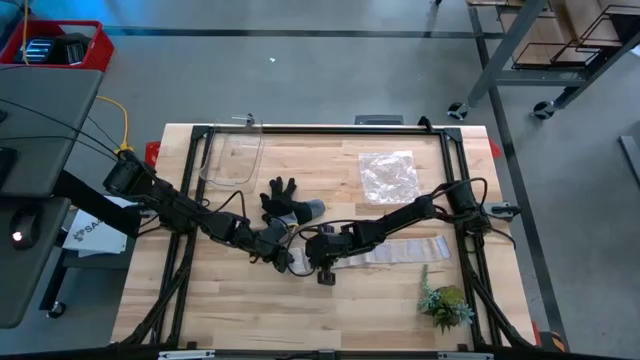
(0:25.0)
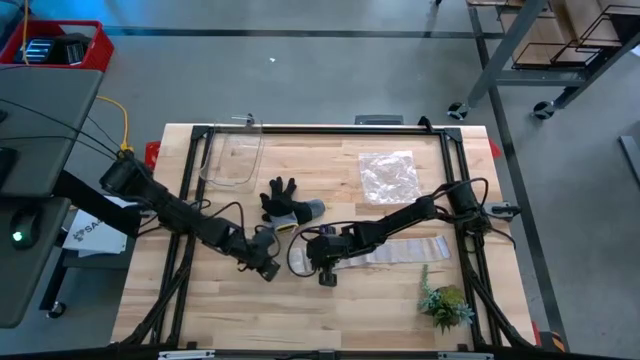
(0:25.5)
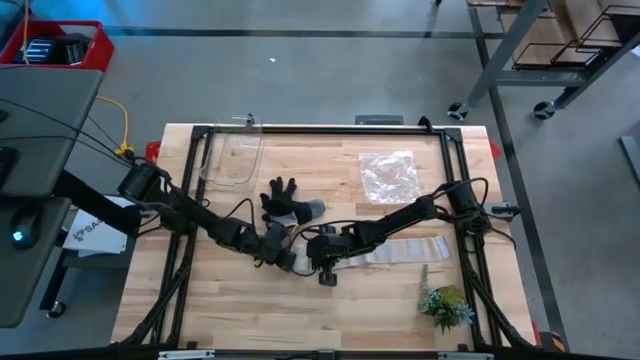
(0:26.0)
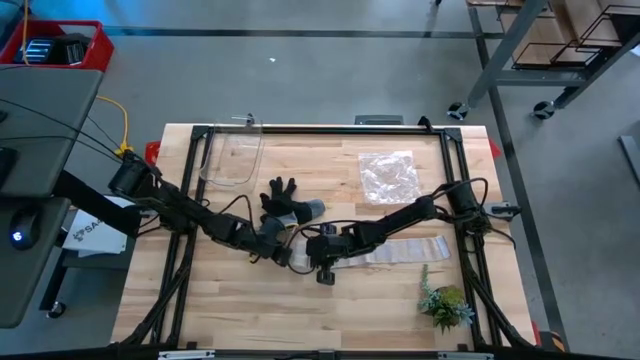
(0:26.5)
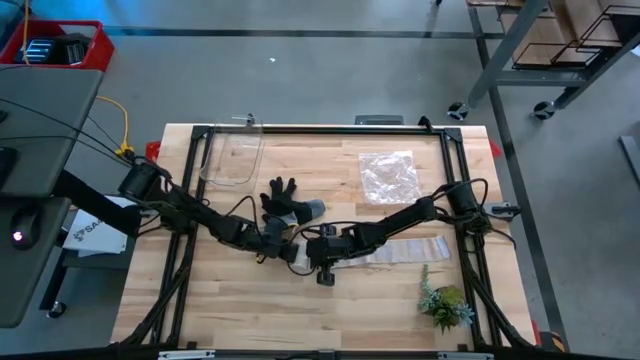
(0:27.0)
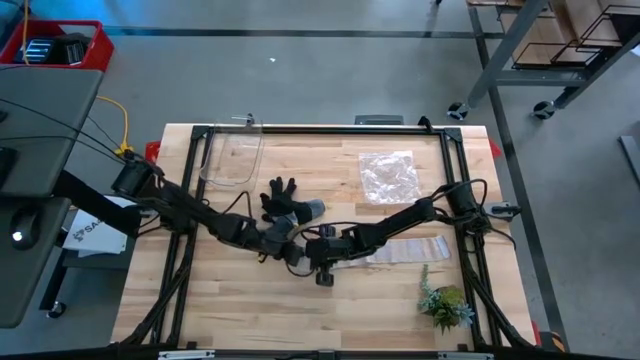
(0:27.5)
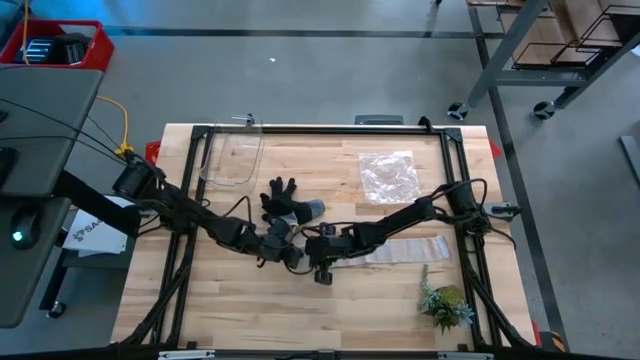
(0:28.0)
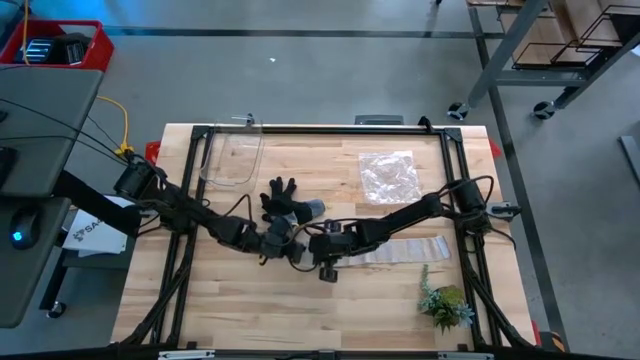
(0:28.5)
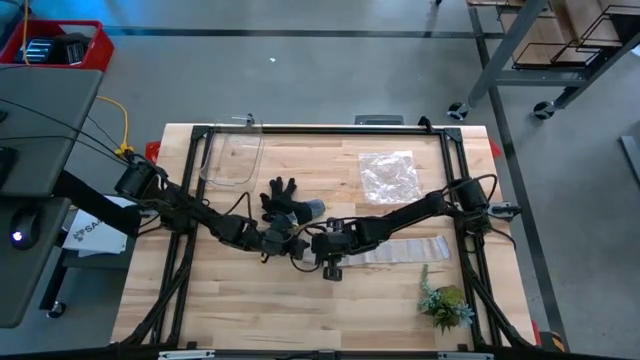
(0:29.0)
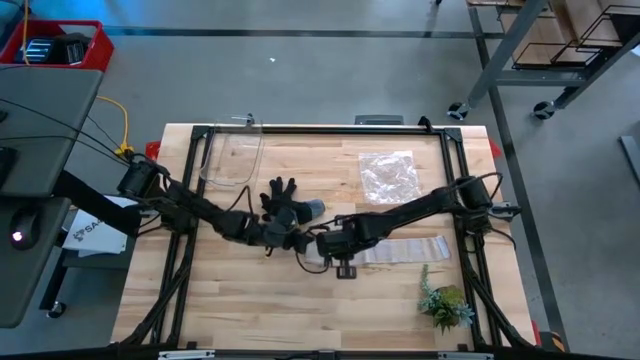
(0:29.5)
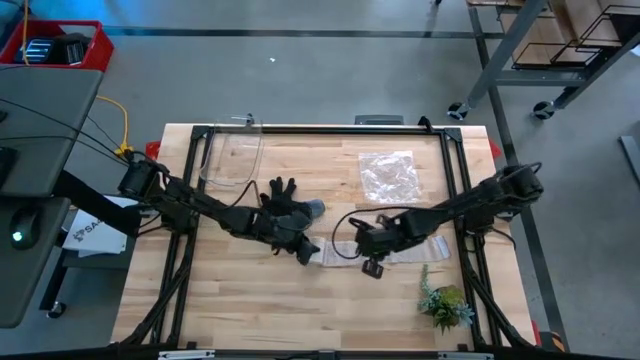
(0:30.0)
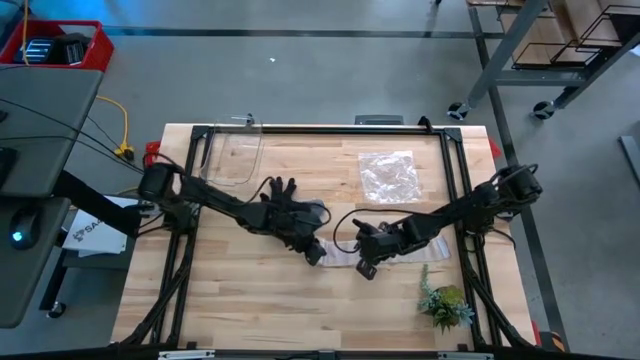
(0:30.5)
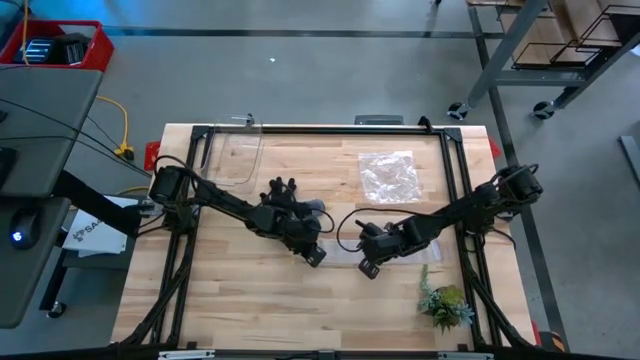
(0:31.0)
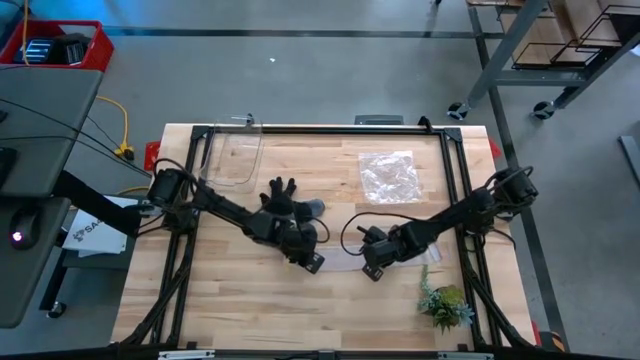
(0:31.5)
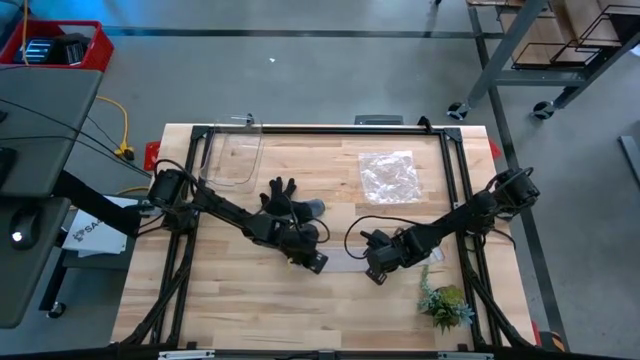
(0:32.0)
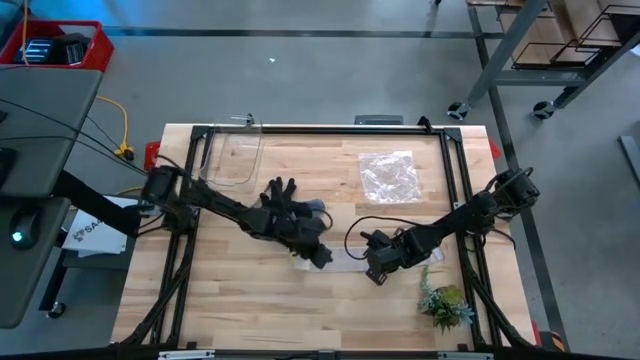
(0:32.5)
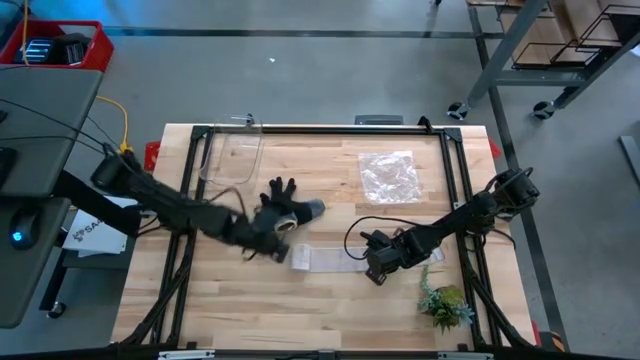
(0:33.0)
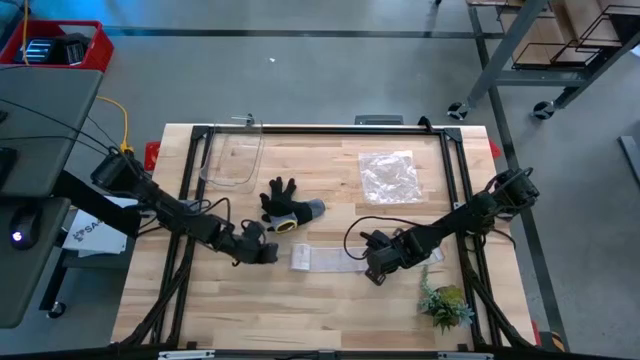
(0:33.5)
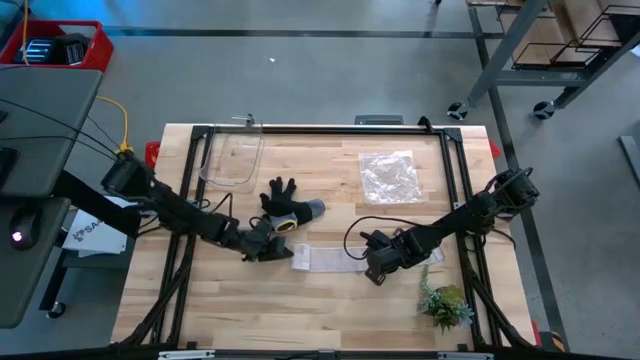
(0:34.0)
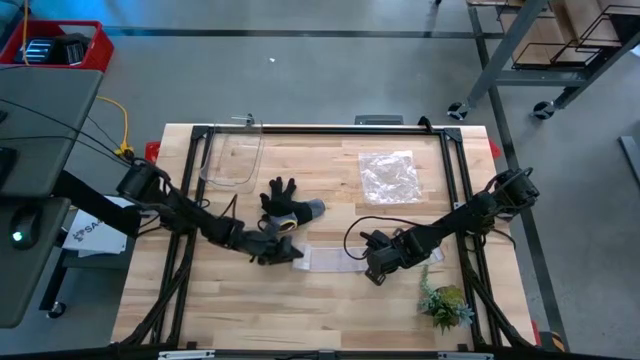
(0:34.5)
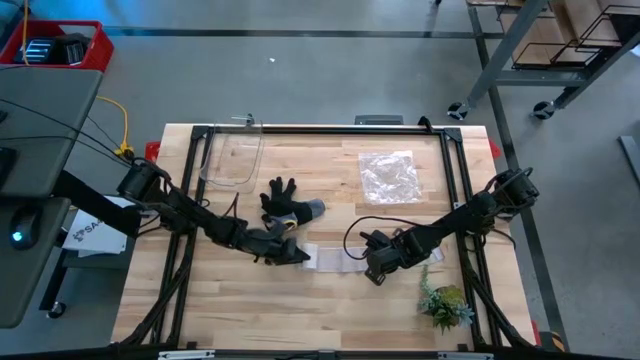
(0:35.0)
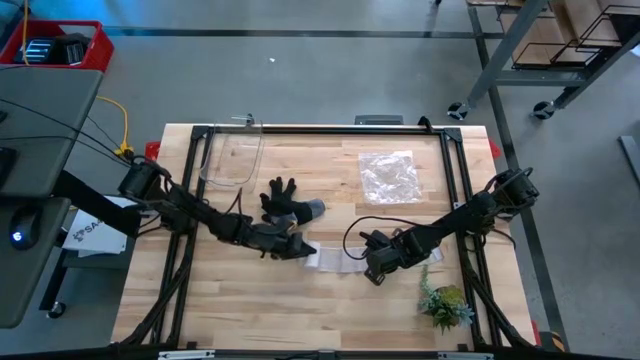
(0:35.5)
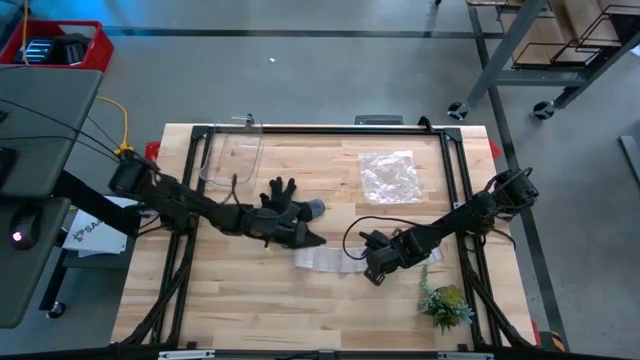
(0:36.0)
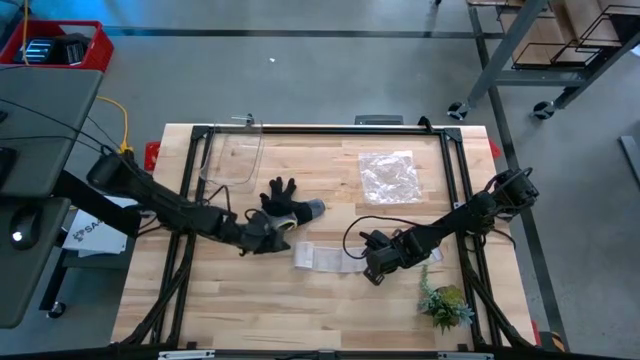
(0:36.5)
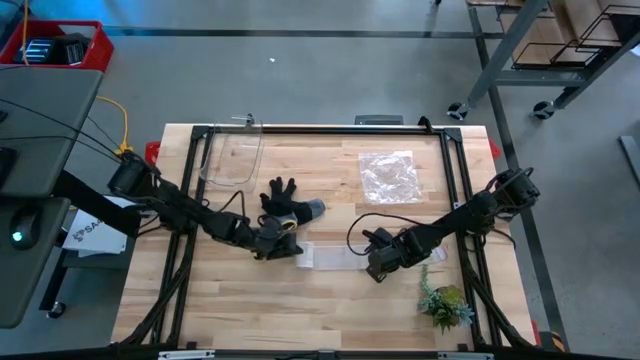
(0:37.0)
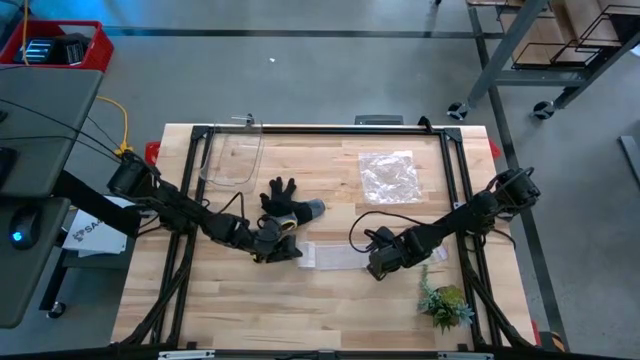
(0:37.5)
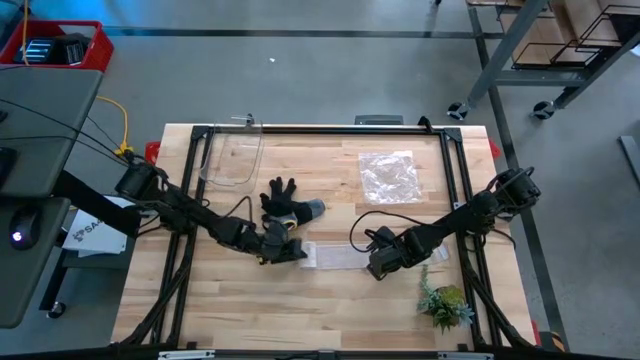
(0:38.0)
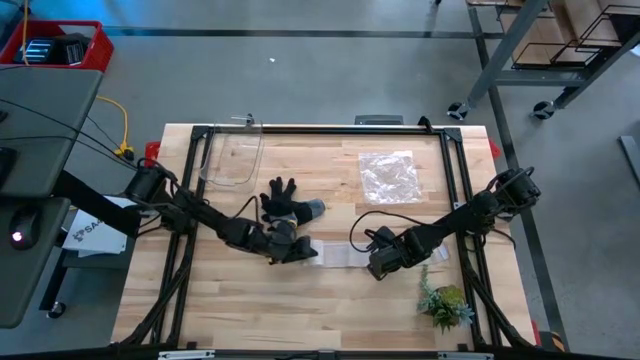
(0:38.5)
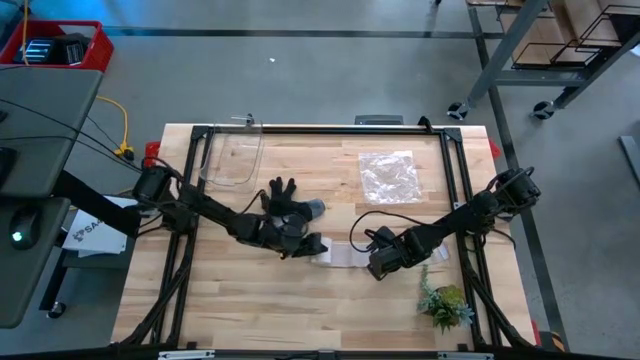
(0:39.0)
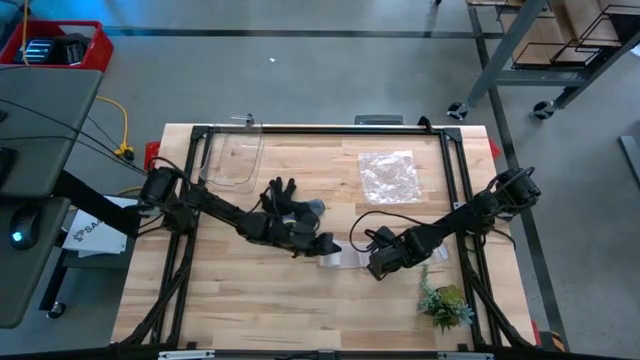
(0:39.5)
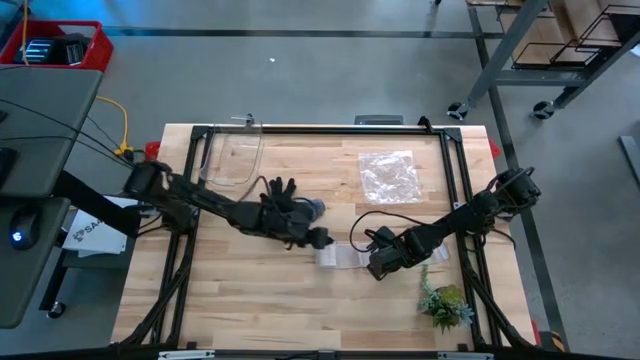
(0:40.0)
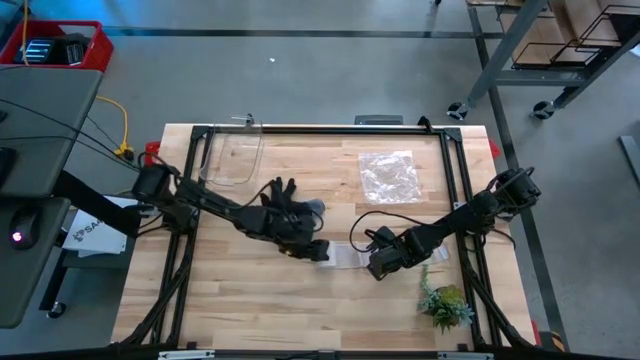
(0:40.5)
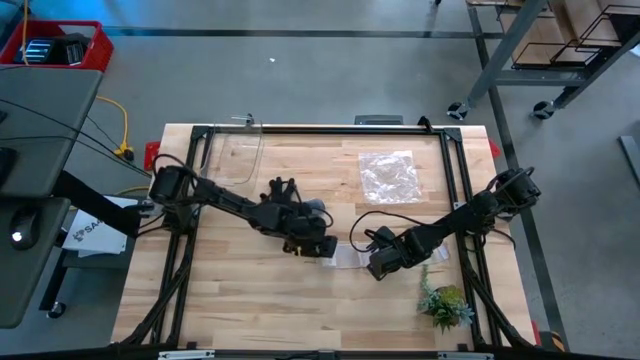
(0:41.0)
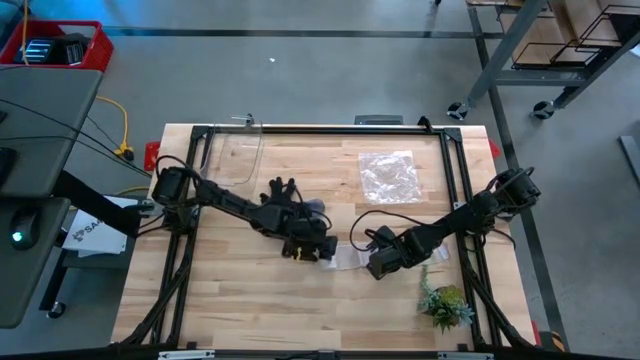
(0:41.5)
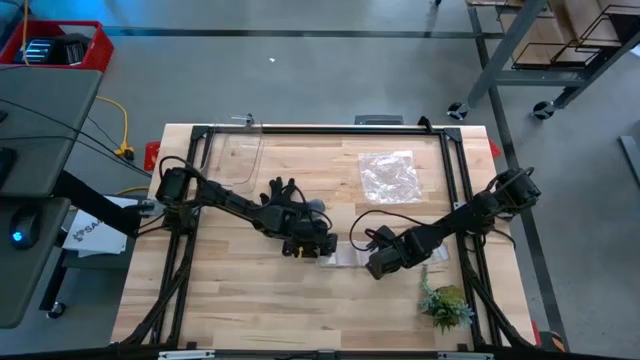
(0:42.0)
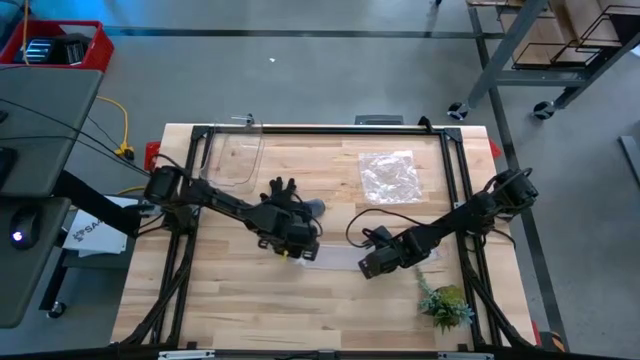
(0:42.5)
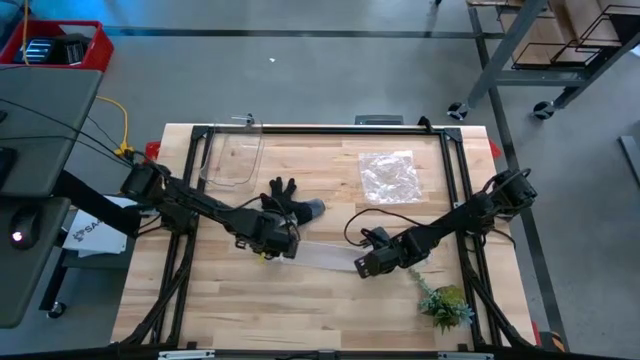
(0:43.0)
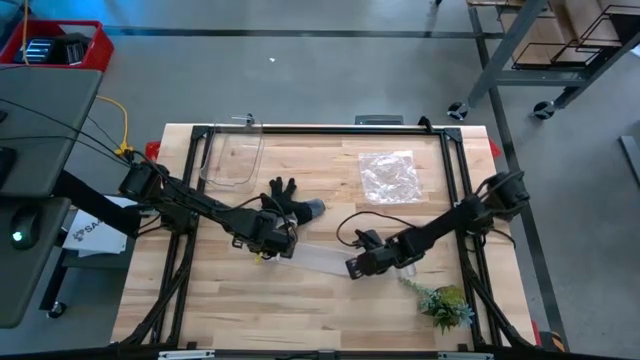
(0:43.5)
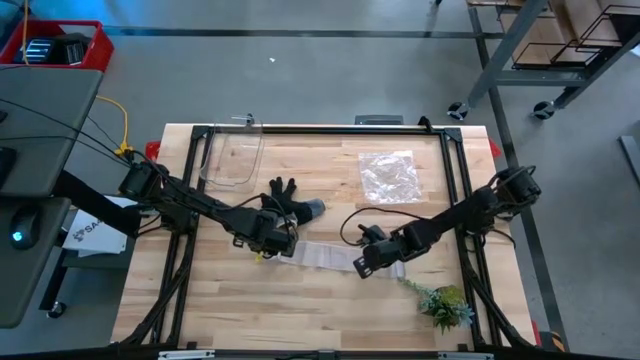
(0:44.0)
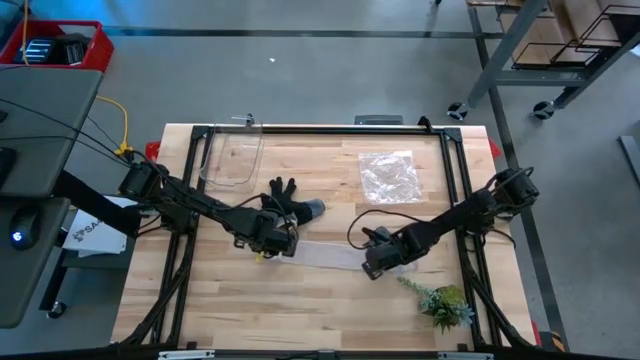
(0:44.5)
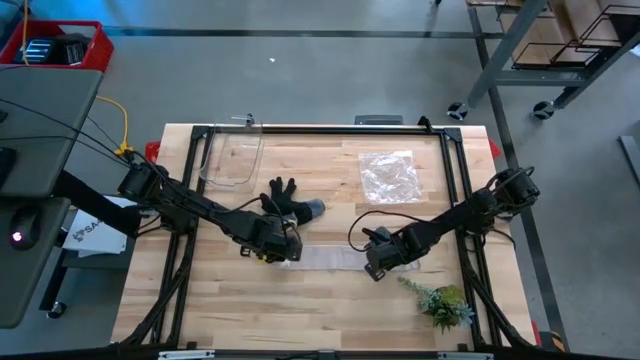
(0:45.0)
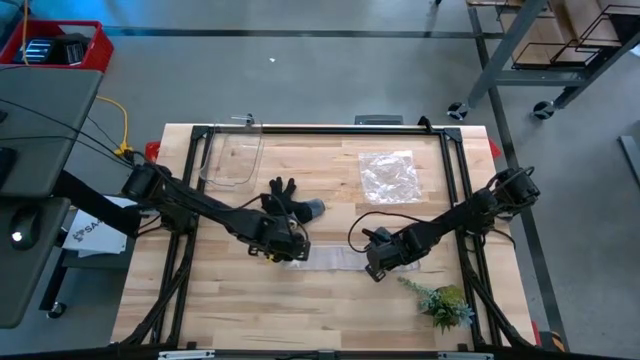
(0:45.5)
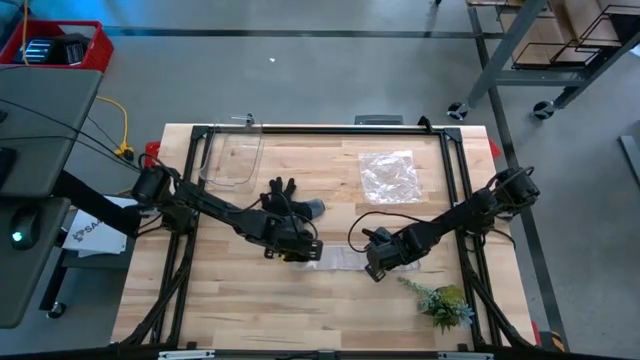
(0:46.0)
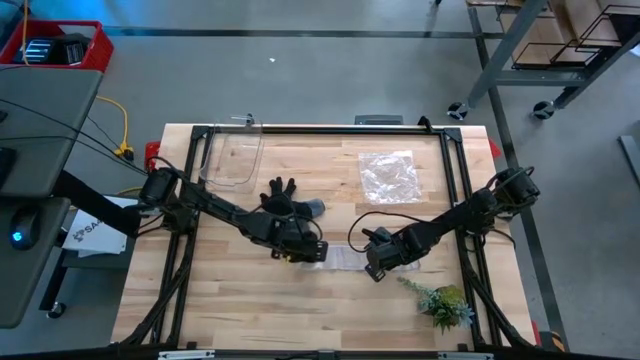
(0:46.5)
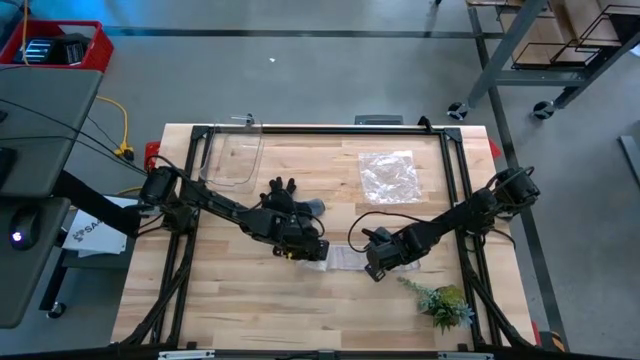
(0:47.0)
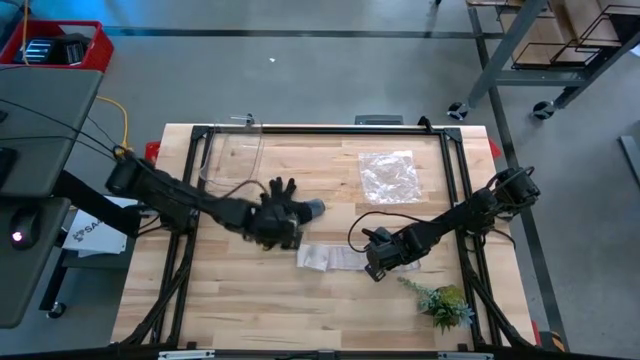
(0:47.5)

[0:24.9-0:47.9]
Task: Roll bandage
Roll the white-brown bandage
